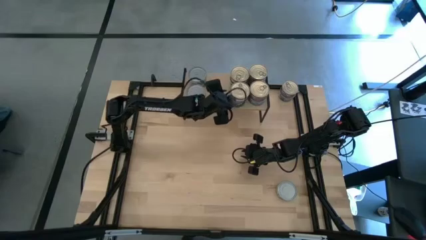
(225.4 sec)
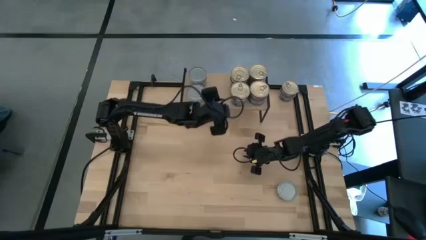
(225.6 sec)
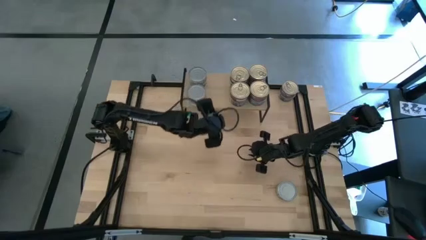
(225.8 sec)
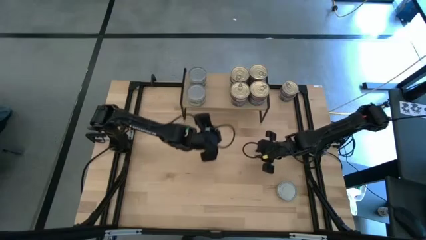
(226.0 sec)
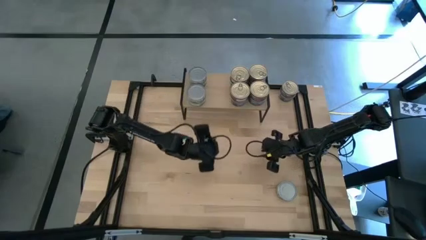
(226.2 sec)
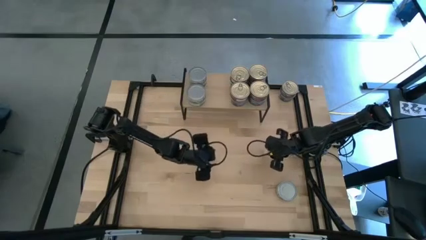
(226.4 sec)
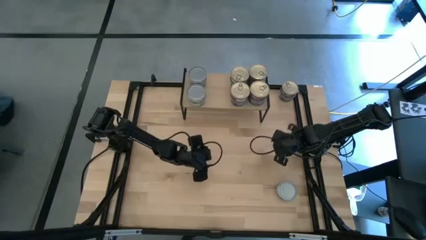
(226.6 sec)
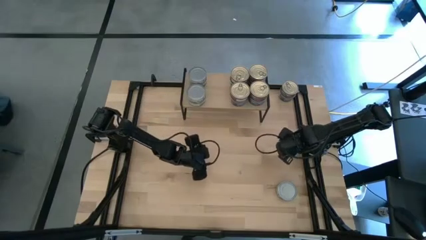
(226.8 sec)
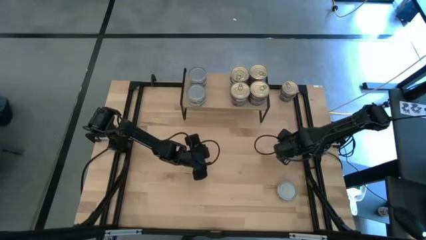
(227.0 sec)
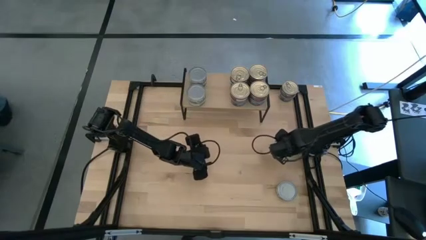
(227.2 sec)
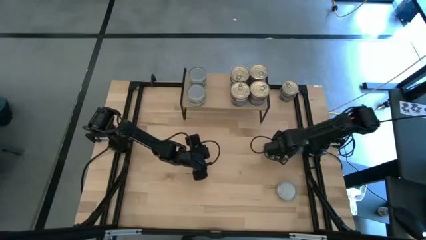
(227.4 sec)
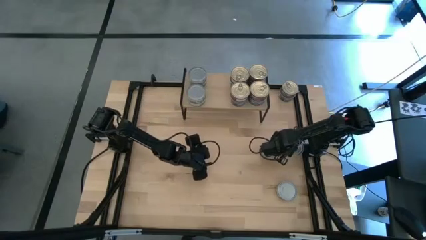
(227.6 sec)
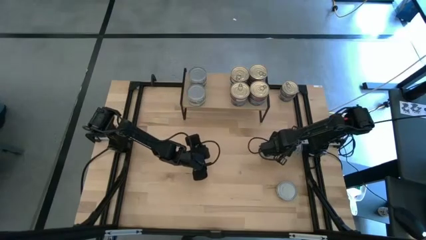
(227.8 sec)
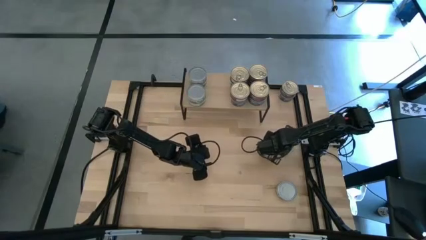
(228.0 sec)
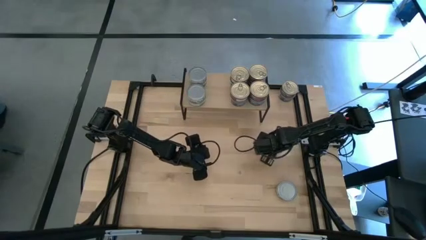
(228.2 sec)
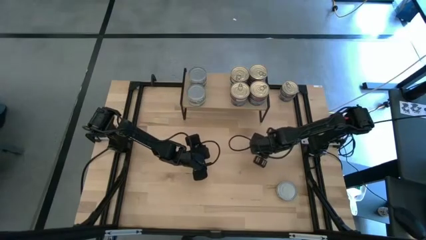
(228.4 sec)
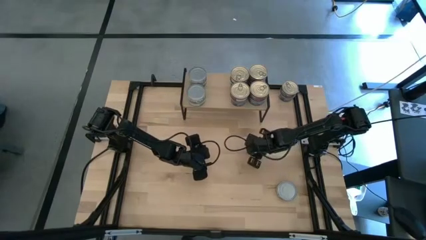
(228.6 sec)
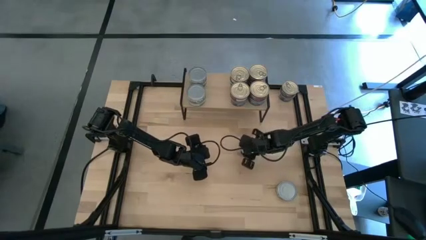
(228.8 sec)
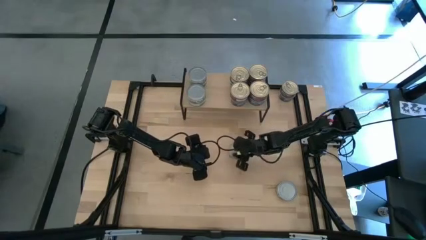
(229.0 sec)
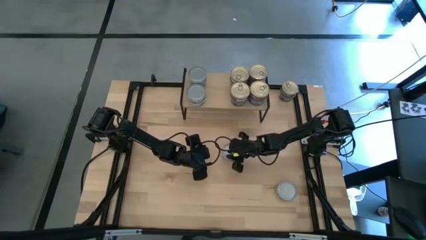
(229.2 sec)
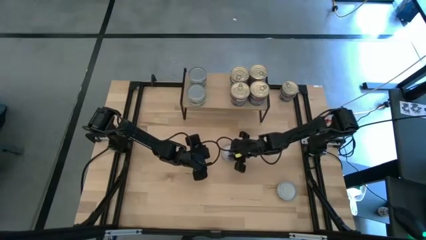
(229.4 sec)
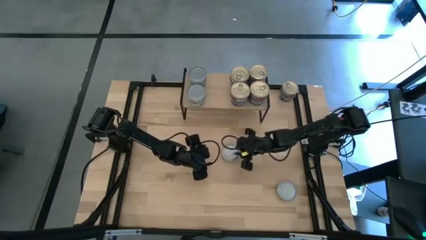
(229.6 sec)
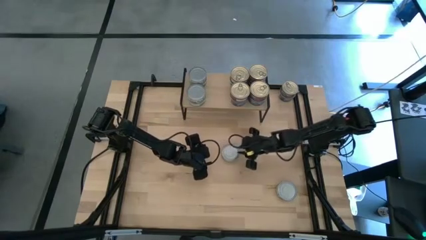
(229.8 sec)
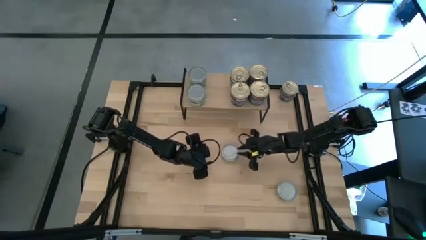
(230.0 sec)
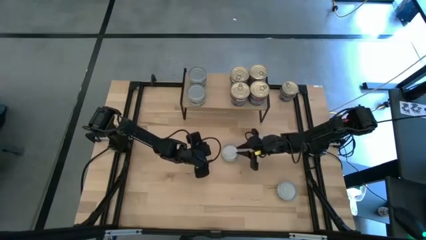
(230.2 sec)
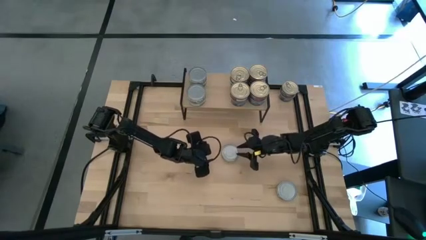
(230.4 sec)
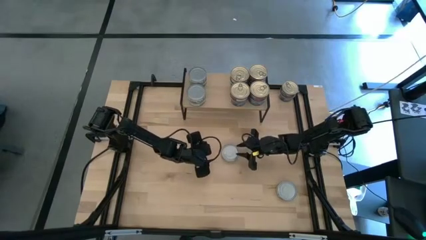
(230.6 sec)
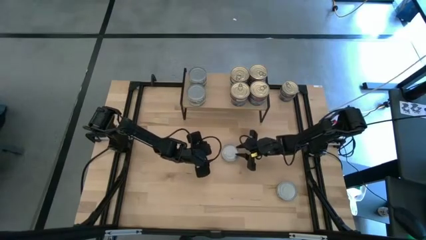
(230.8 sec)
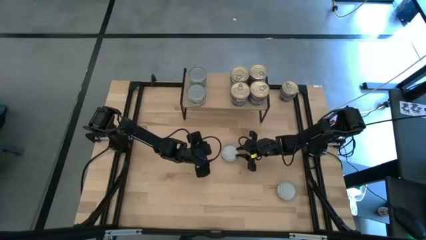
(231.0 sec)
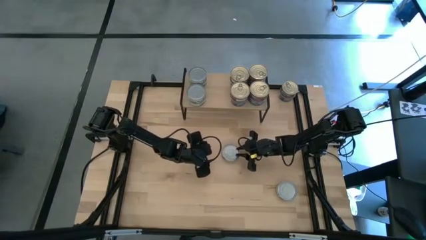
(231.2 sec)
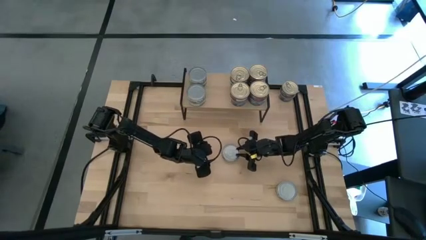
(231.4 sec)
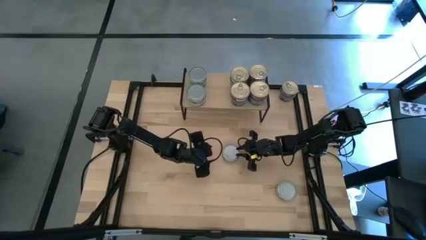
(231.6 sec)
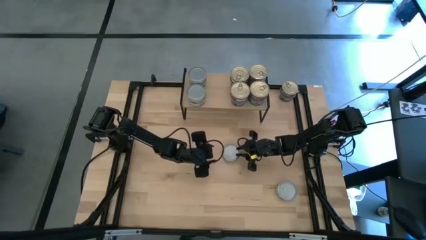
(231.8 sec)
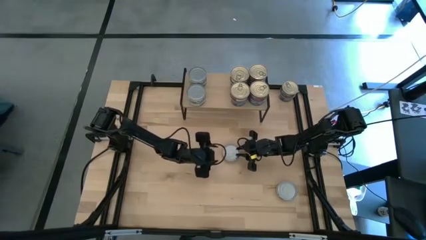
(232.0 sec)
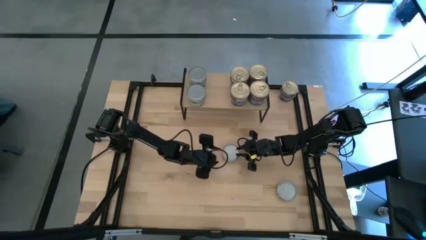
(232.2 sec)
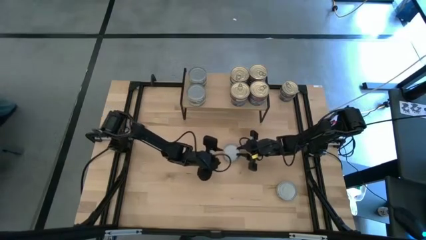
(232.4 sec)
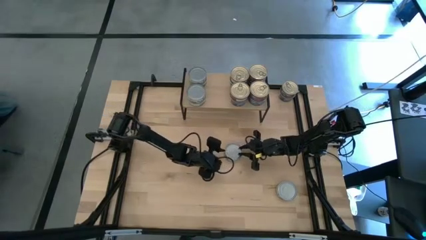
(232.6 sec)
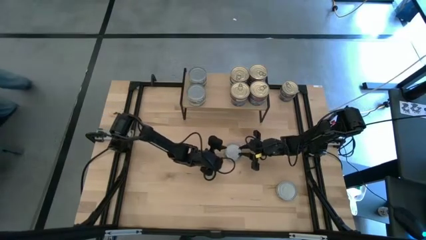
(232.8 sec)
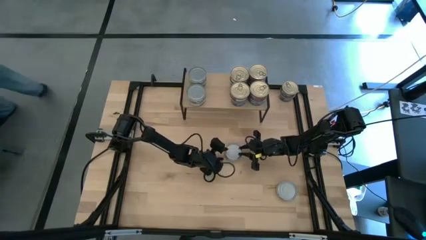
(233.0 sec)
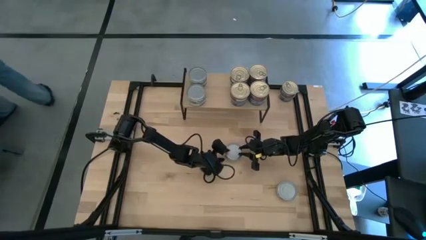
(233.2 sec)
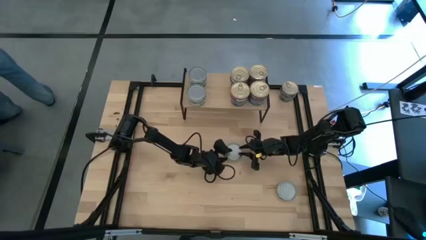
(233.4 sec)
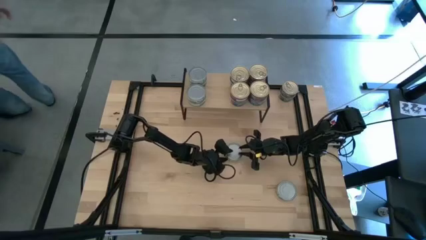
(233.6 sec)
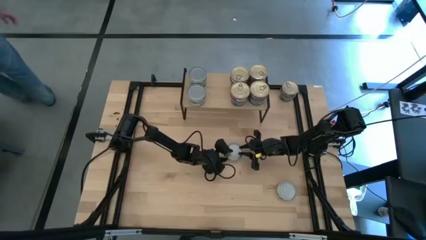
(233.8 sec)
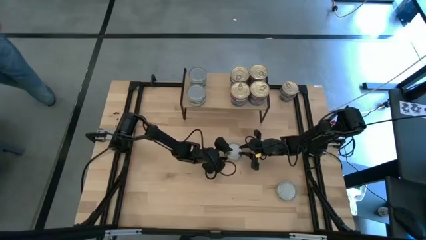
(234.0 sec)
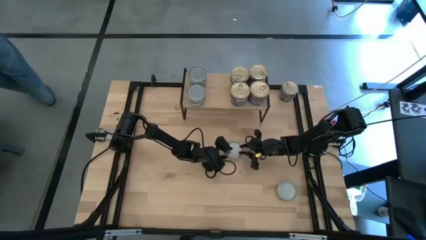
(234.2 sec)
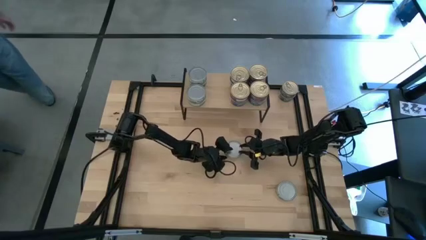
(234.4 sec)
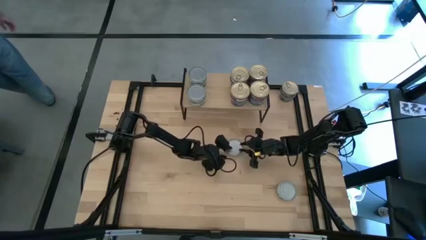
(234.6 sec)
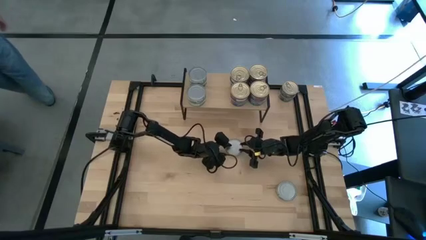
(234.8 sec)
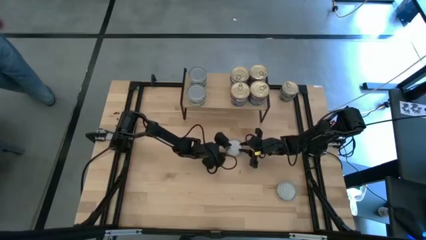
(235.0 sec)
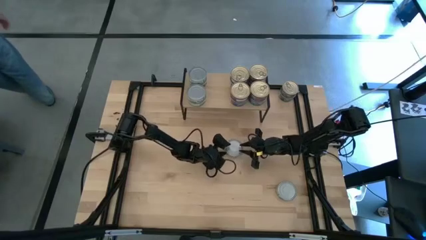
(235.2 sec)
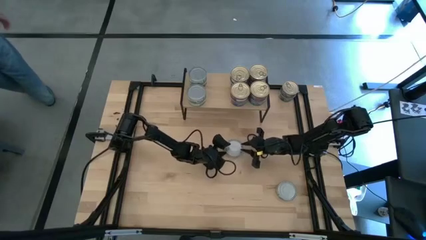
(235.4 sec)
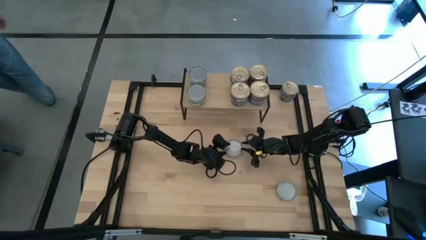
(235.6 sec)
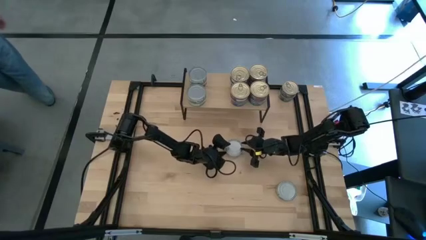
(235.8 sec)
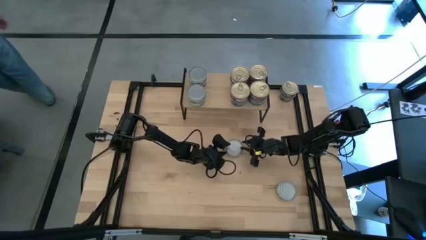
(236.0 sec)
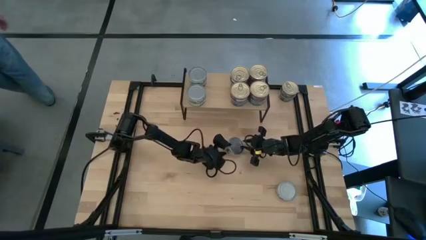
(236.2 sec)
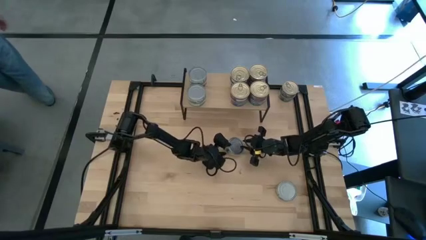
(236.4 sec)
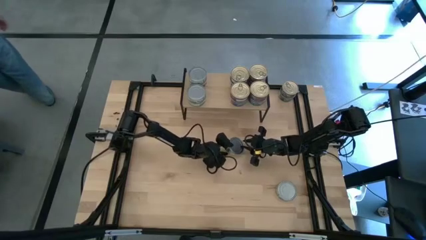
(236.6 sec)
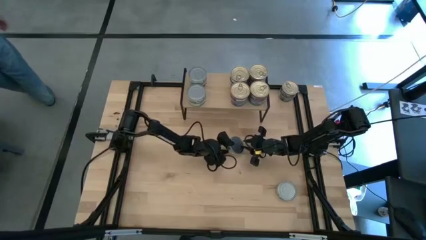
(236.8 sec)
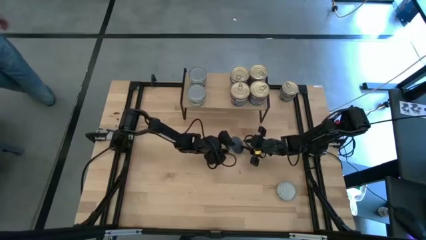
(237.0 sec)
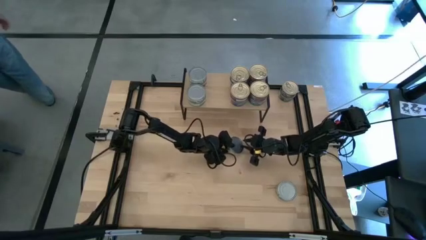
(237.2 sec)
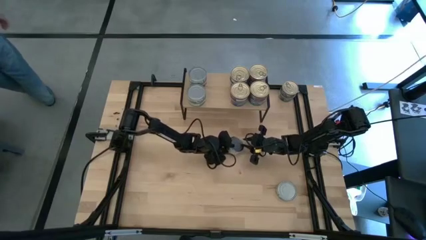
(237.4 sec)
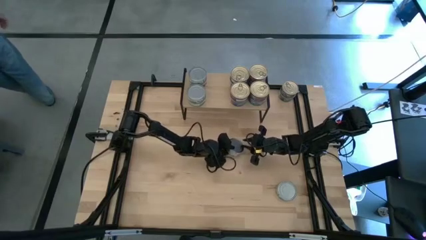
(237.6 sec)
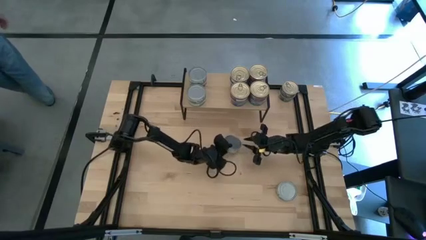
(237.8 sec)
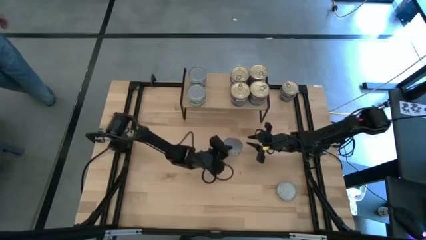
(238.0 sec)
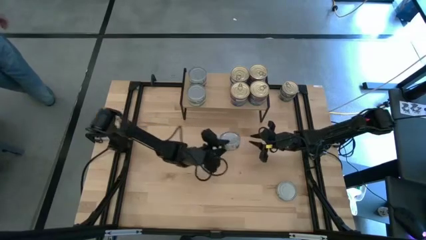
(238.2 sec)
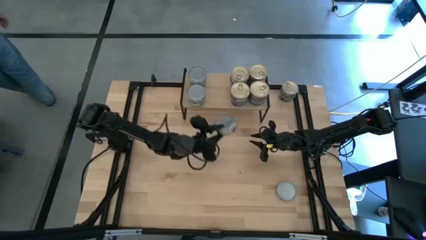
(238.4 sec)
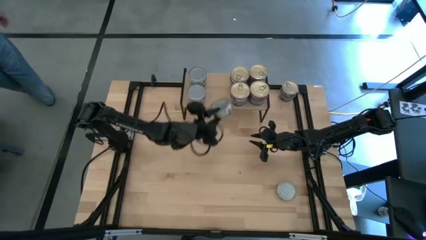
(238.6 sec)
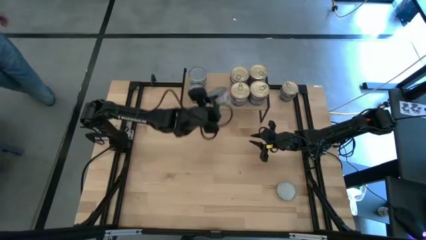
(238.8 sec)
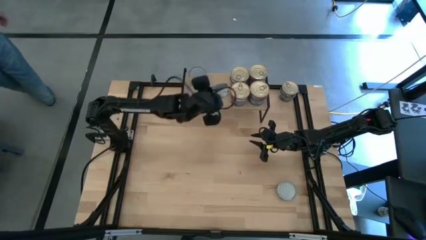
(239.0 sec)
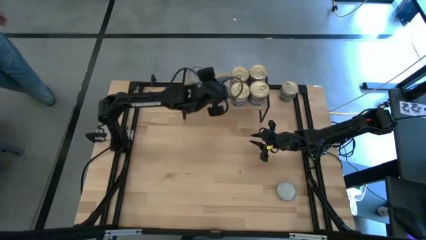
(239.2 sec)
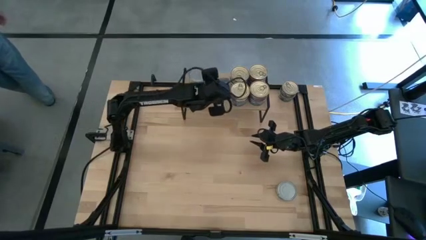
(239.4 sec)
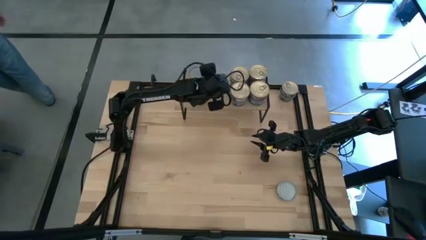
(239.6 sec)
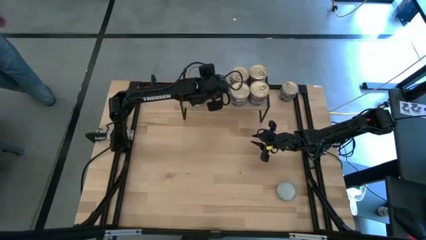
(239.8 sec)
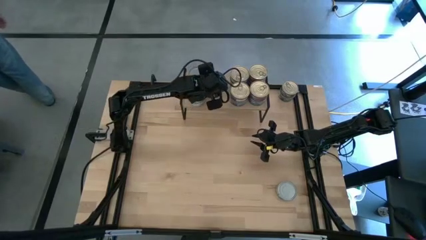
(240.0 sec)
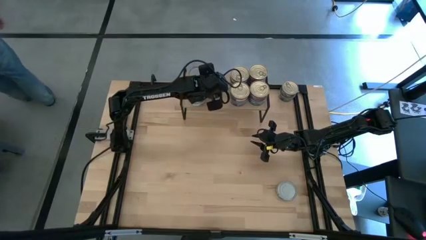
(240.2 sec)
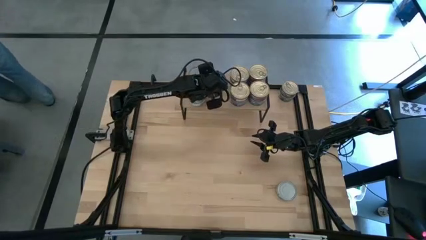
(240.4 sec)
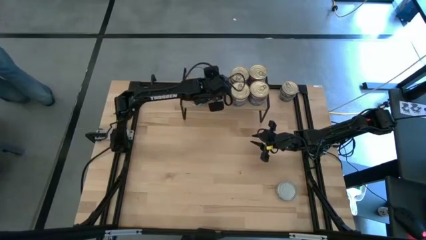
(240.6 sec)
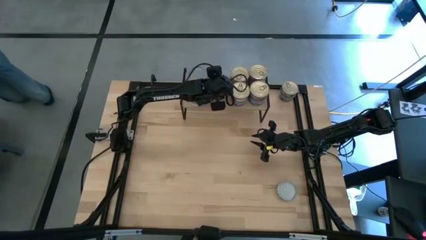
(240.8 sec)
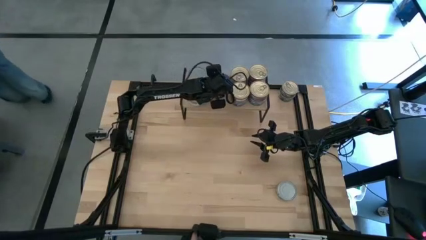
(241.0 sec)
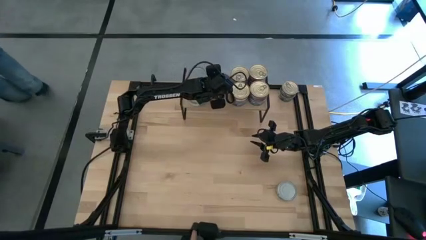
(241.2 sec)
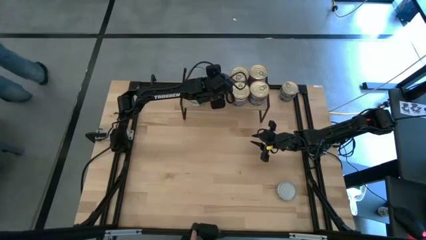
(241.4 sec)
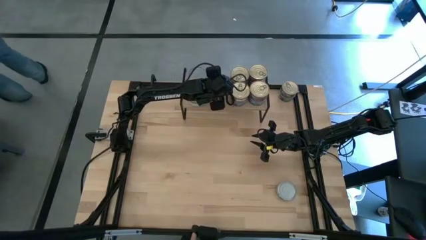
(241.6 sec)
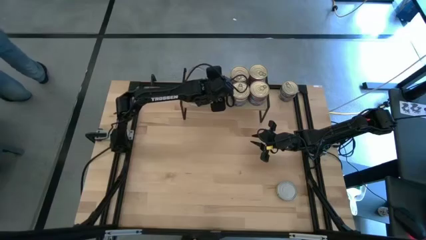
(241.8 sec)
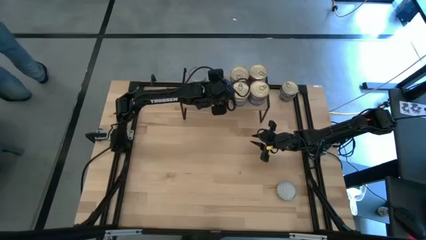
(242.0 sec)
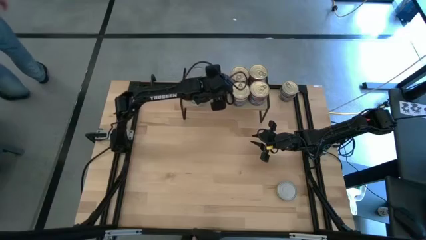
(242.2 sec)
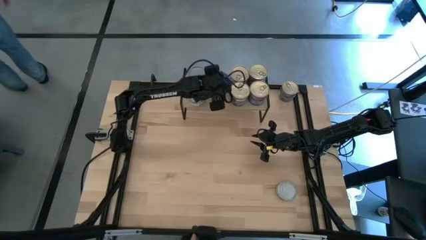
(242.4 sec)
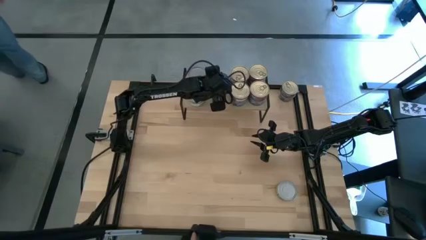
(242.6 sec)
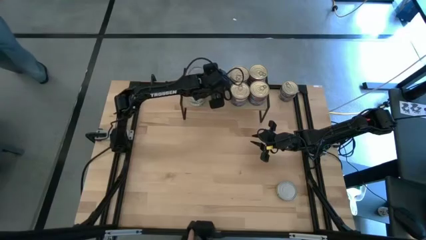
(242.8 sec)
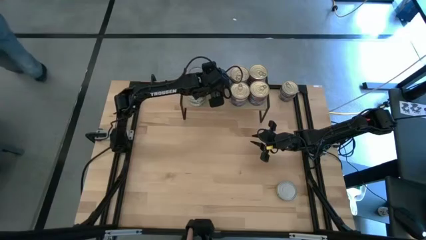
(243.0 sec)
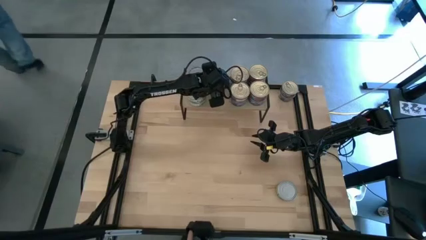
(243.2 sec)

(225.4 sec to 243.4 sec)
Task: Stack canned seafood by type on shelf
Put the green white tuna can on the shelf
